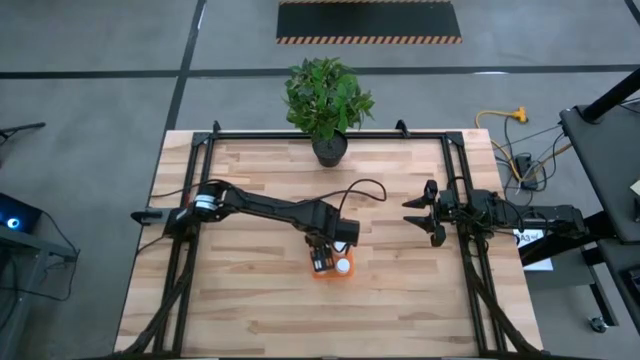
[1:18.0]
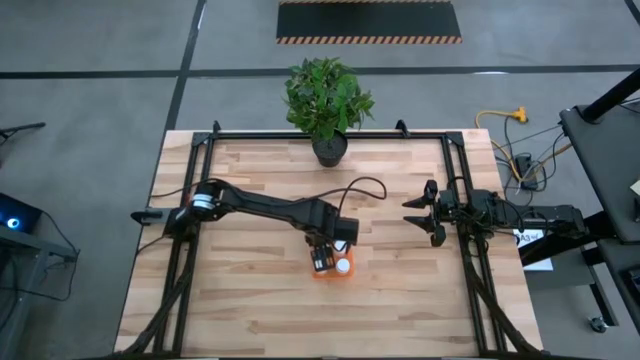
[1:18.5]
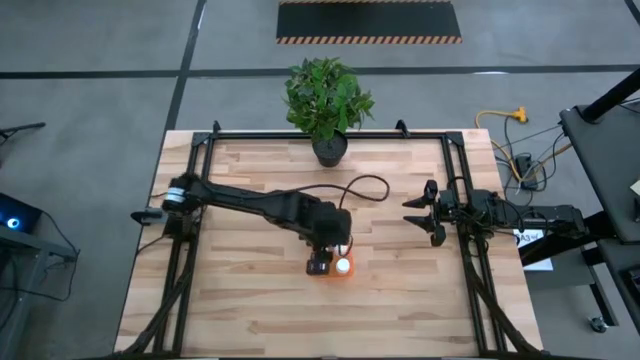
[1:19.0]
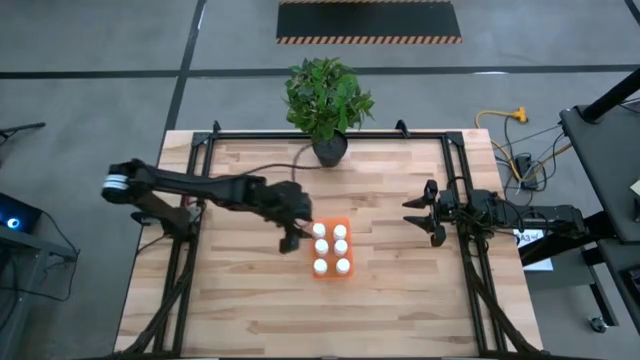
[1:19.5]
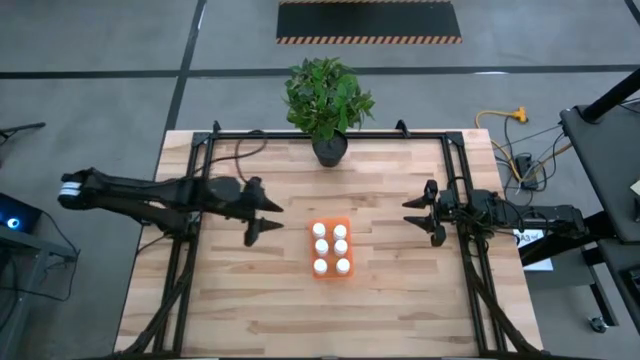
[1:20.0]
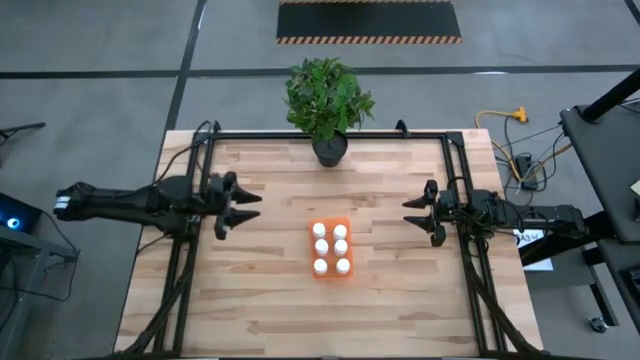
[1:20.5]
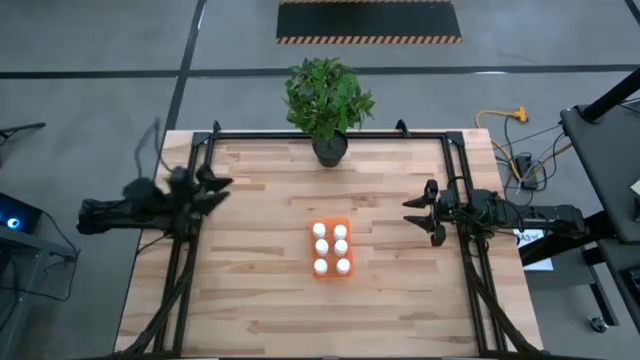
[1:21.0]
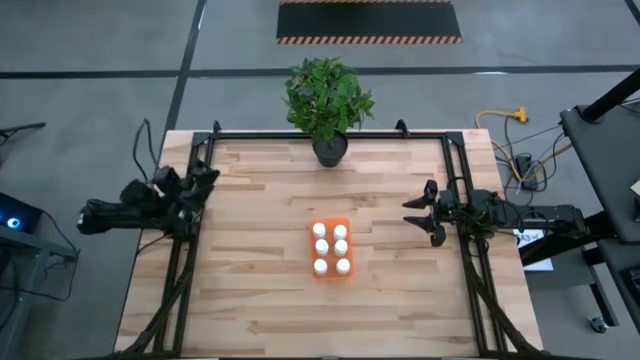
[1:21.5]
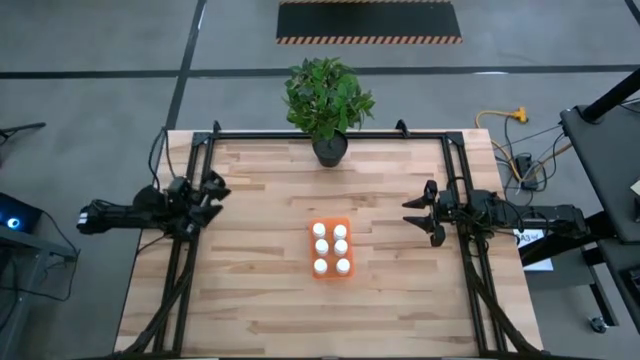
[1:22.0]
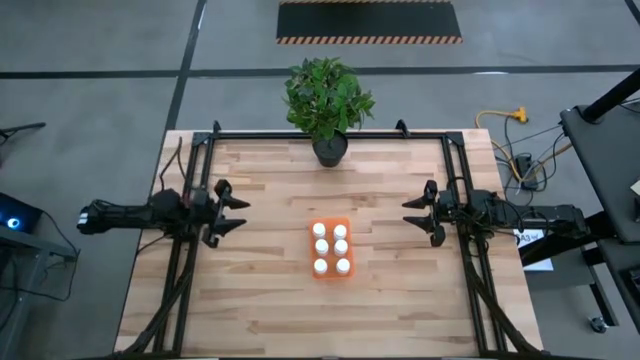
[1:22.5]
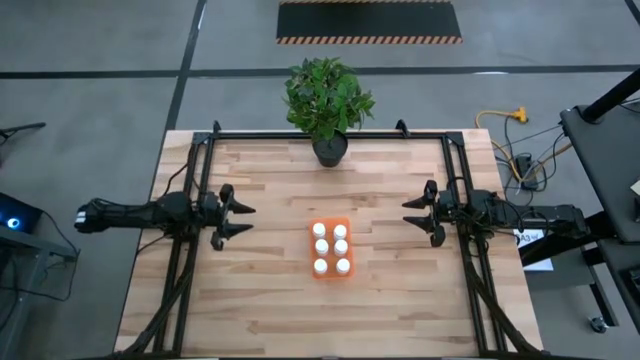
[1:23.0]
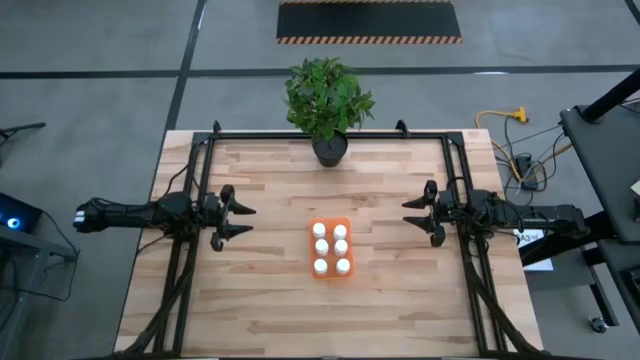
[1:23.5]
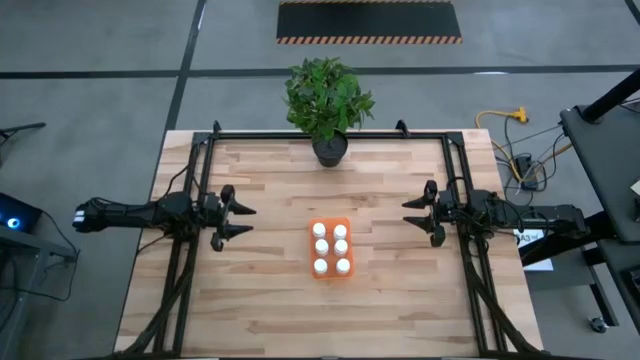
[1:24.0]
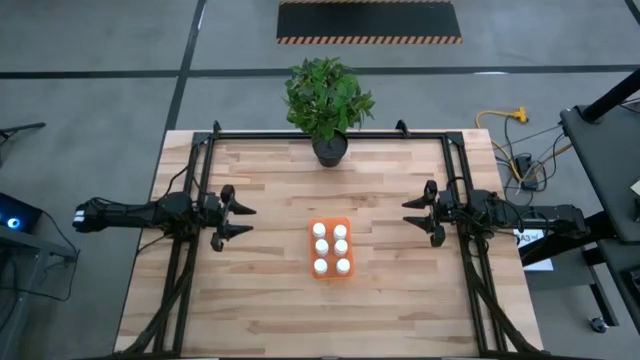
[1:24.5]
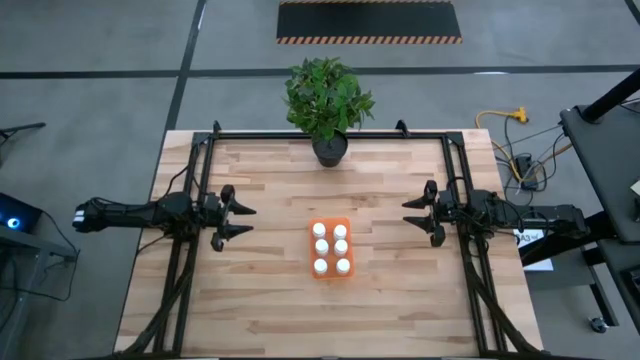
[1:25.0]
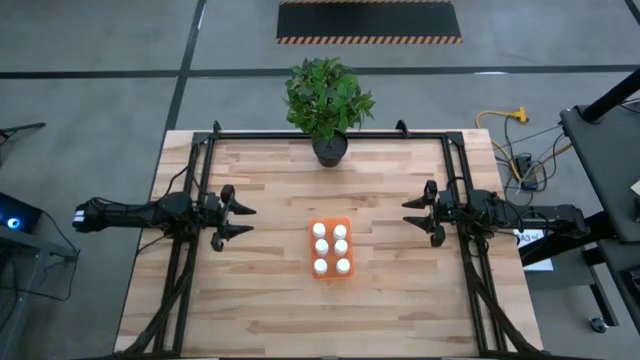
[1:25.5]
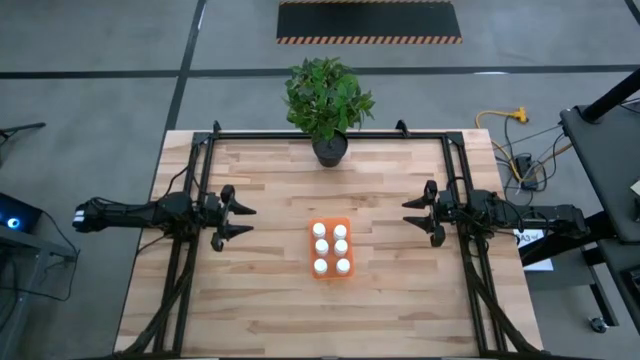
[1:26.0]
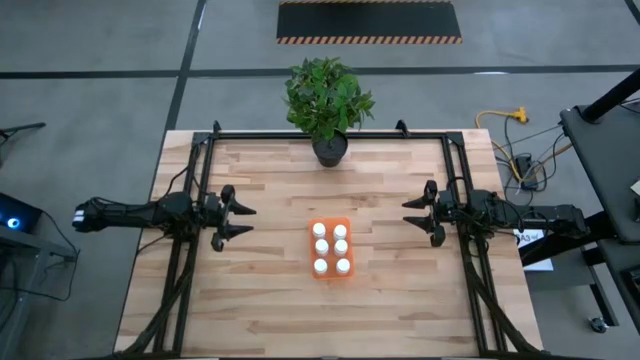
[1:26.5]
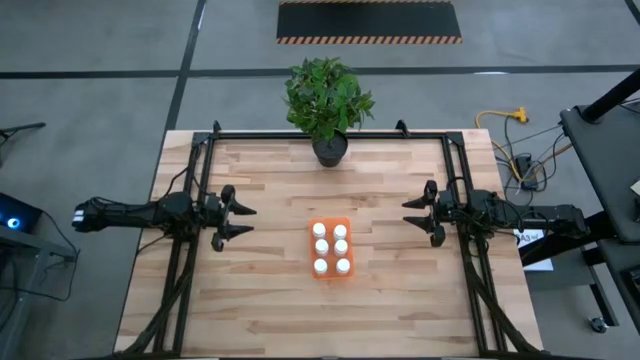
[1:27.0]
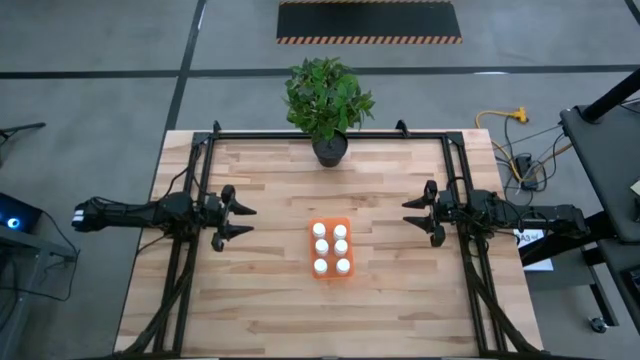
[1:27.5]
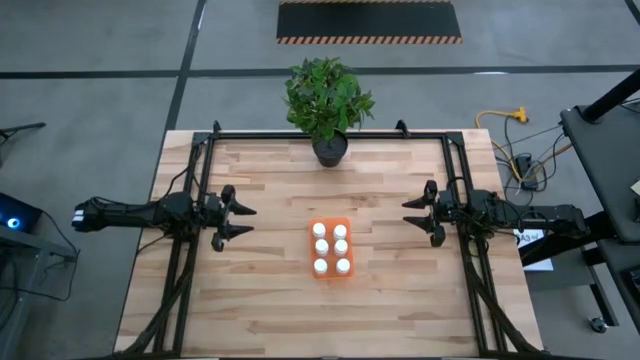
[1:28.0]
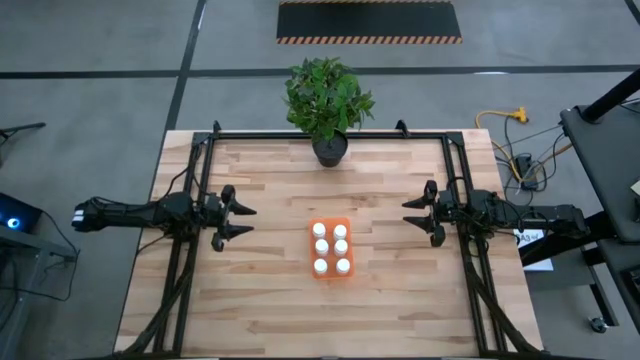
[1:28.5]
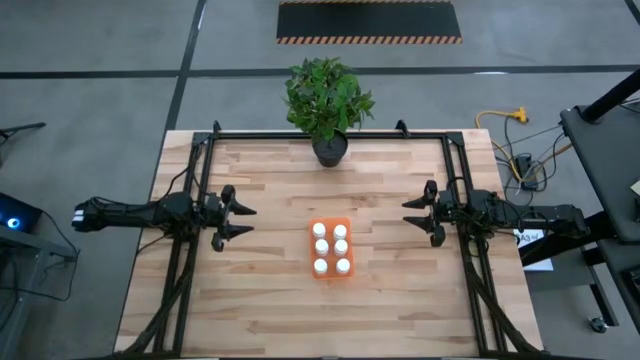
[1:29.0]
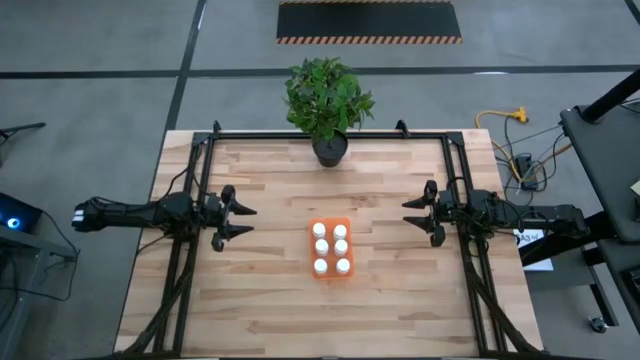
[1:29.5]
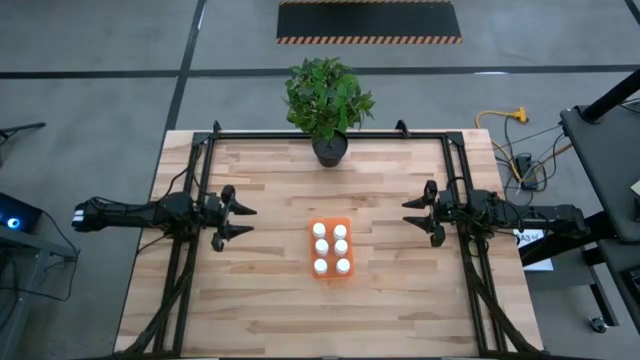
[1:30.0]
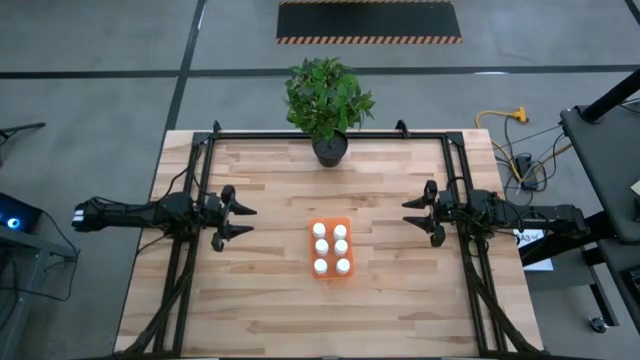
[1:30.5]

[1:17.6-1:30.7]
Task: Pick and place pill bottles into a basket
Return to Home Position

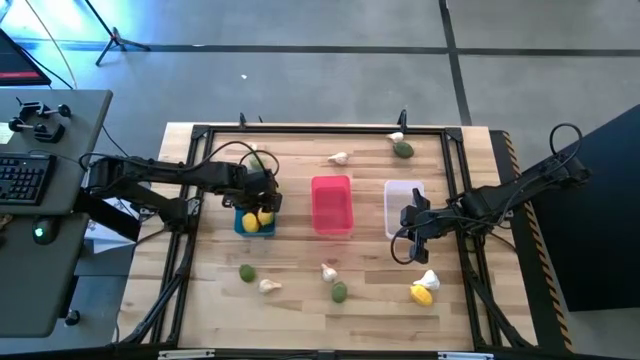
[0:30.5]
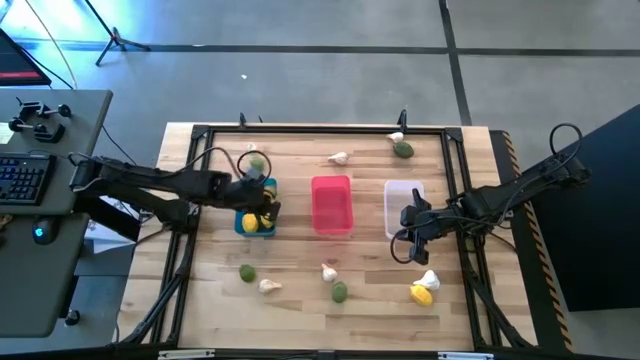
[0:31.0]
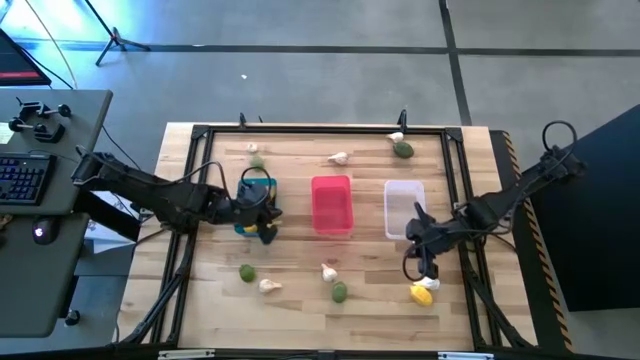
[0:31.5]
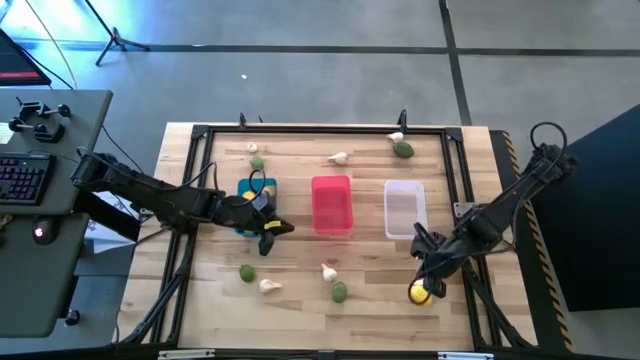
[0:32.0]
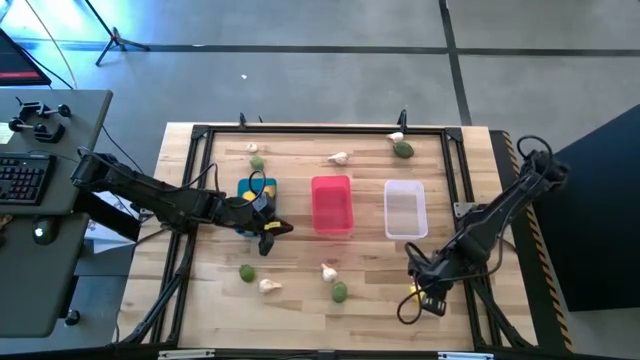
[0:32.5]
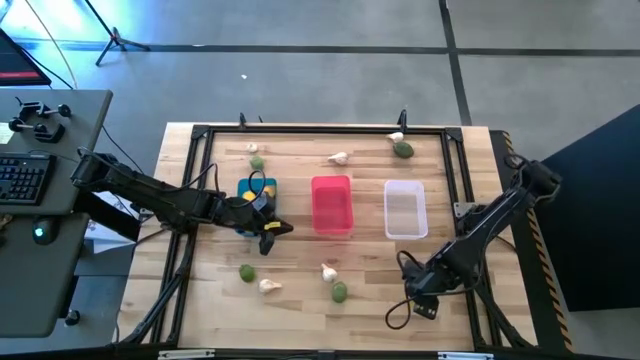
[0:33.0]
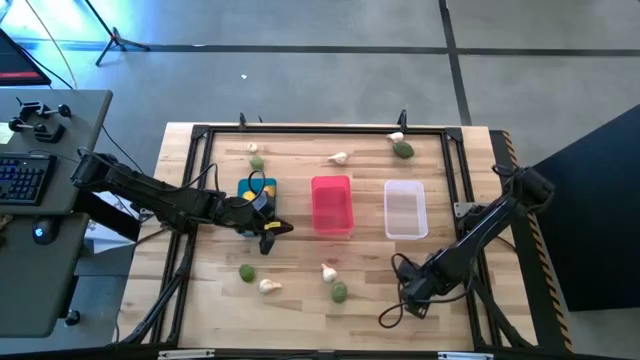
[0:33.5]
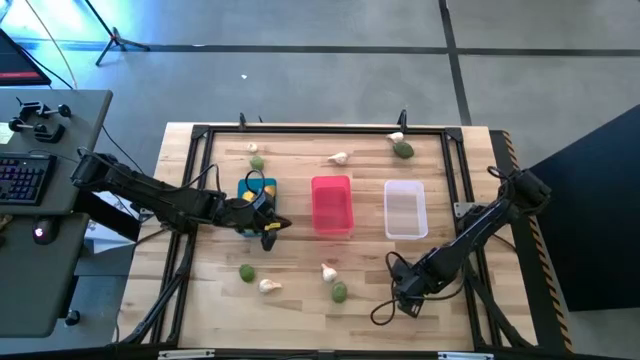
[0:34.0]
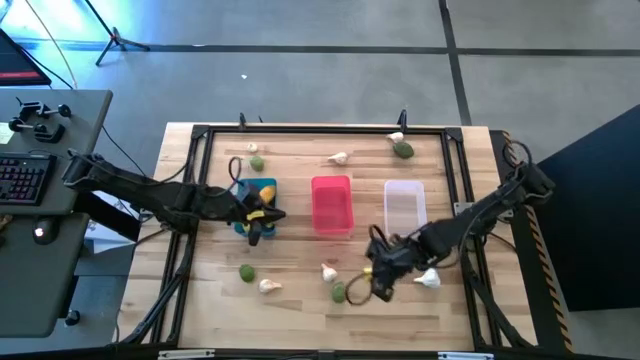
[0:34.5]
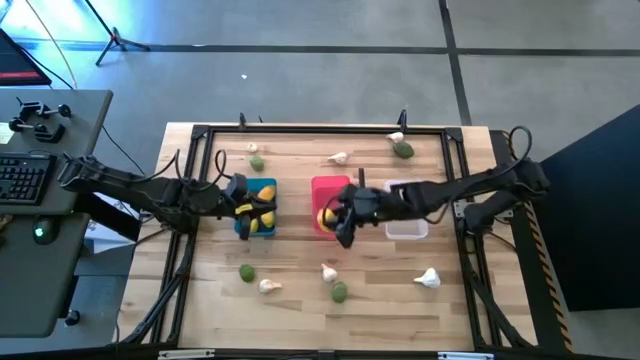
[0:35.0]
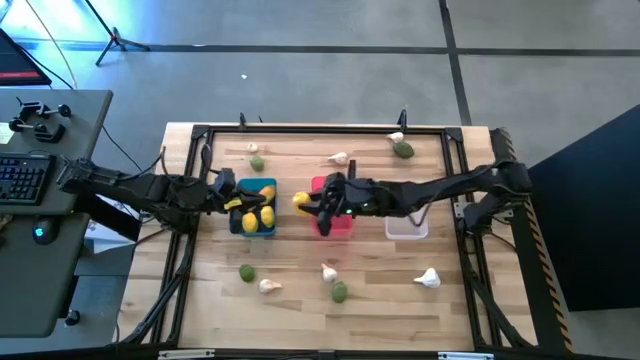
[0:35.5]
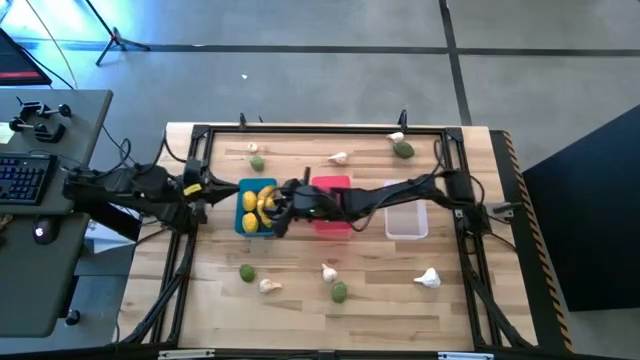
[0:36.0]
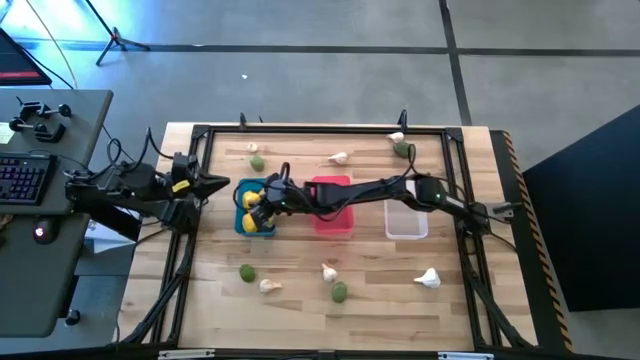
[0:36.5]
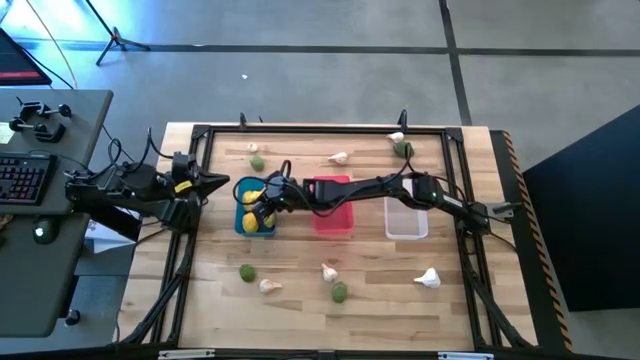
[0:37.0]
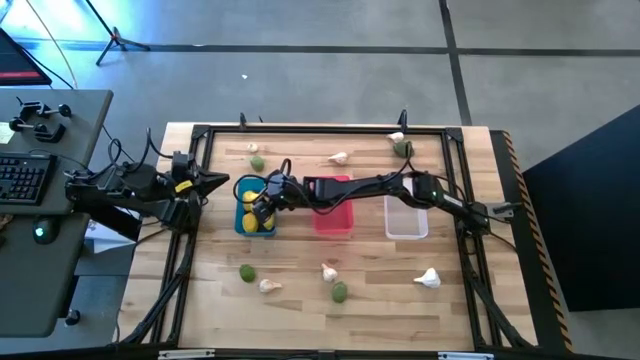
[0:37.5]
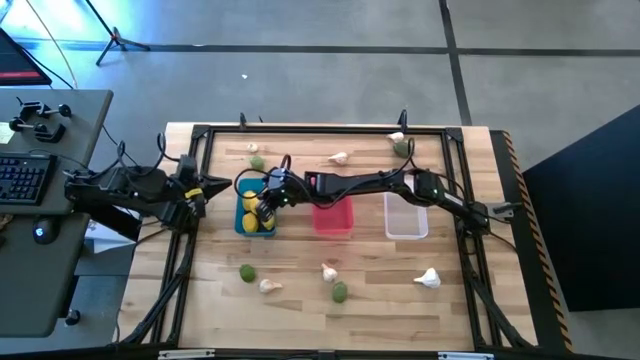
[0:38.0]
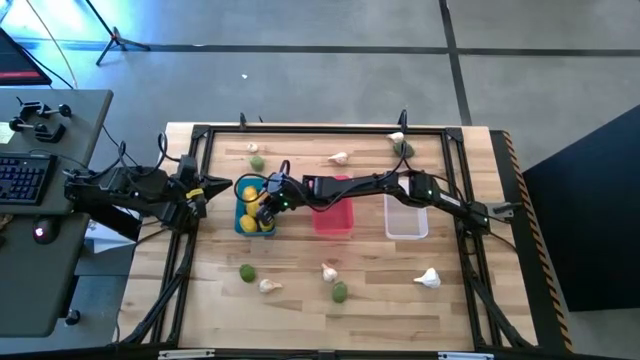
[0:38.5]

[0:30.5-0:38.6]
Task: Sort produce into baskets
Put the yellow lemon into the blue bin
